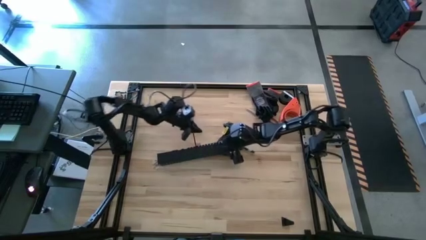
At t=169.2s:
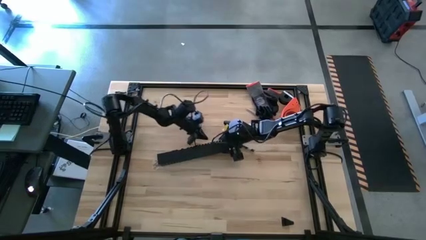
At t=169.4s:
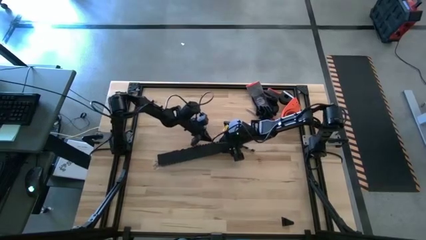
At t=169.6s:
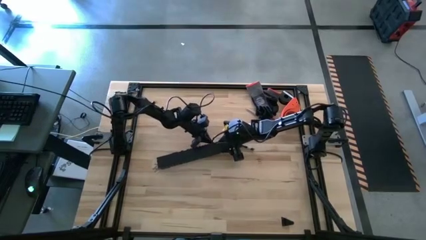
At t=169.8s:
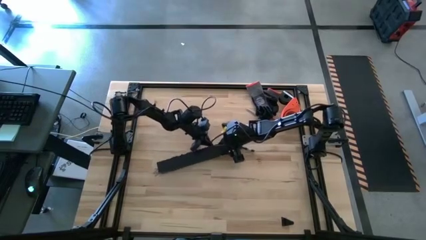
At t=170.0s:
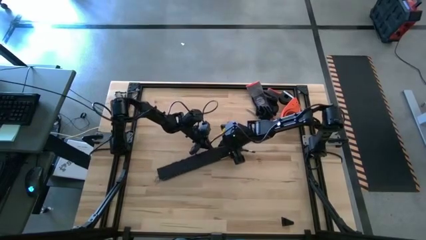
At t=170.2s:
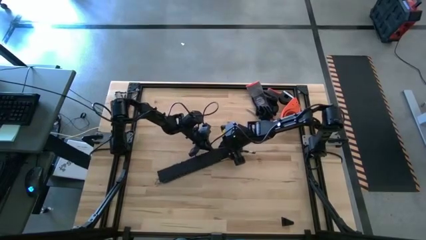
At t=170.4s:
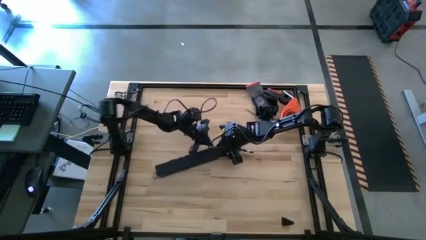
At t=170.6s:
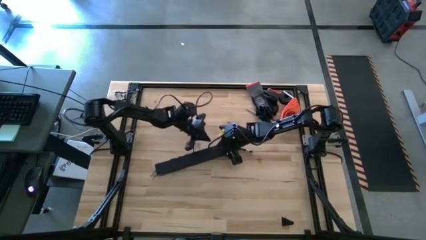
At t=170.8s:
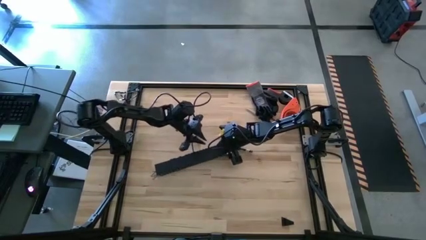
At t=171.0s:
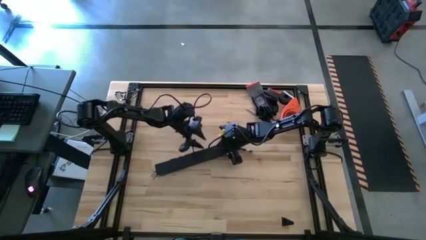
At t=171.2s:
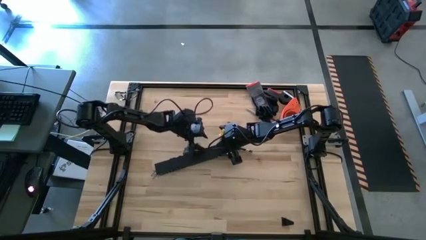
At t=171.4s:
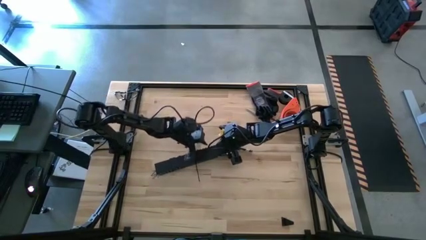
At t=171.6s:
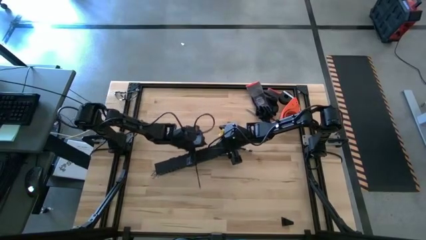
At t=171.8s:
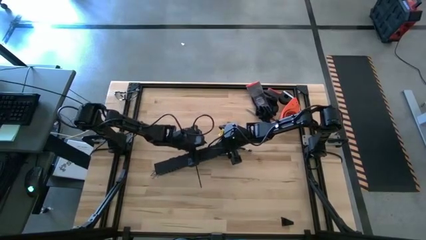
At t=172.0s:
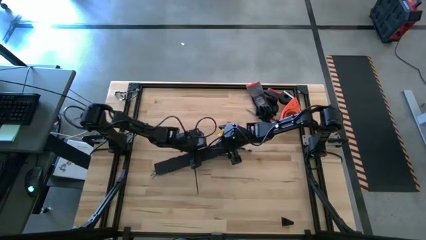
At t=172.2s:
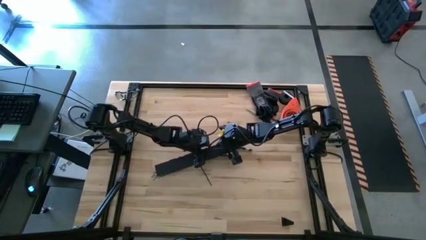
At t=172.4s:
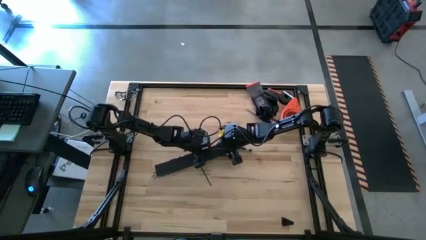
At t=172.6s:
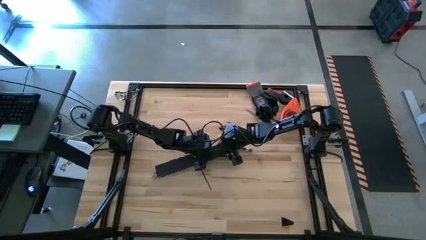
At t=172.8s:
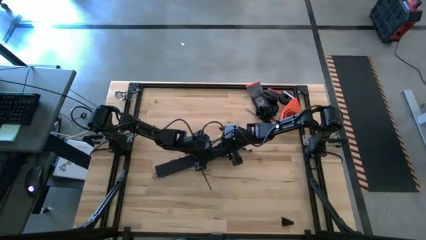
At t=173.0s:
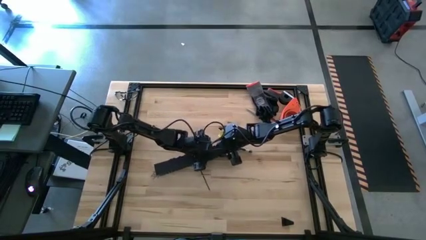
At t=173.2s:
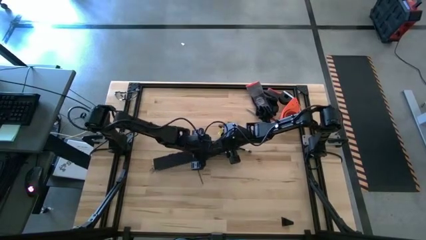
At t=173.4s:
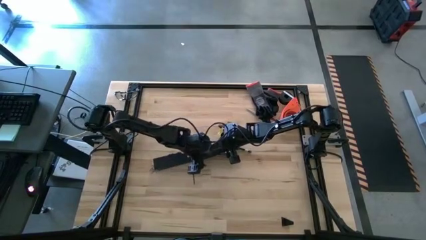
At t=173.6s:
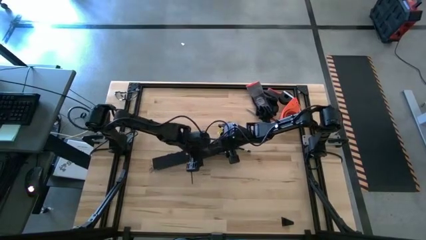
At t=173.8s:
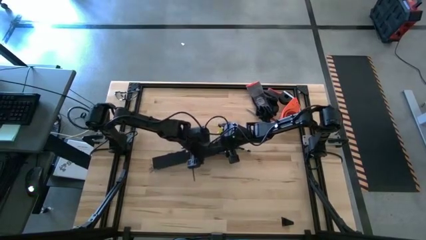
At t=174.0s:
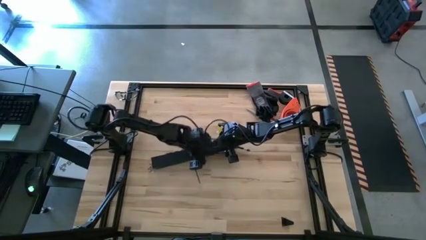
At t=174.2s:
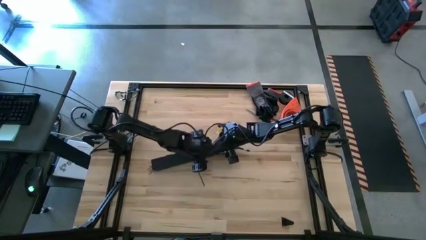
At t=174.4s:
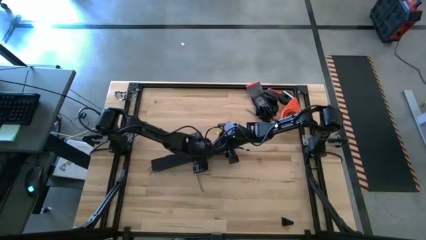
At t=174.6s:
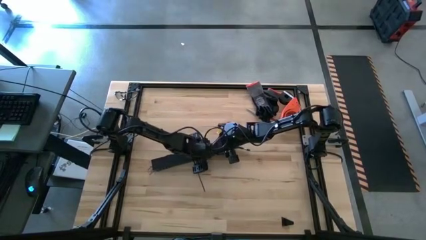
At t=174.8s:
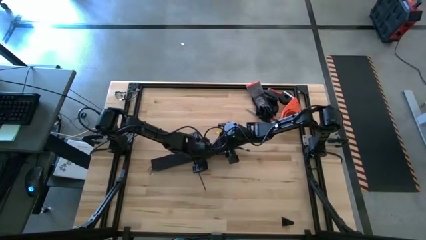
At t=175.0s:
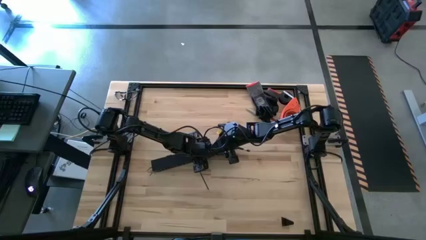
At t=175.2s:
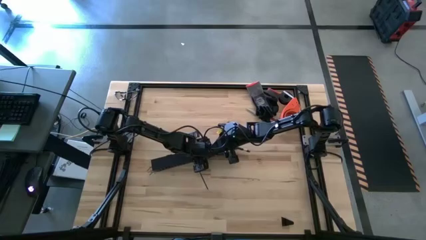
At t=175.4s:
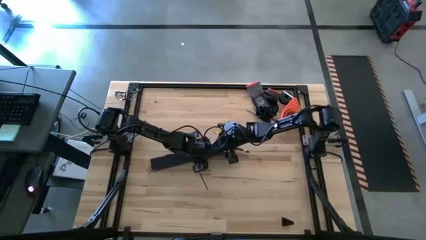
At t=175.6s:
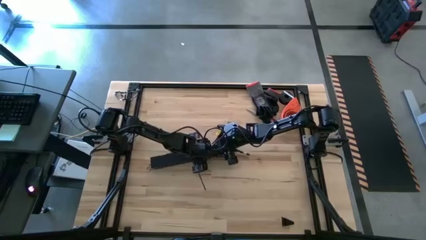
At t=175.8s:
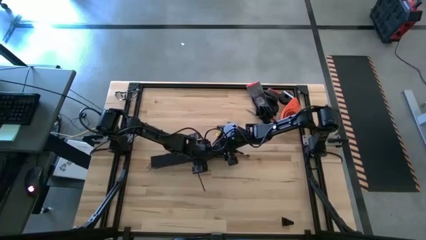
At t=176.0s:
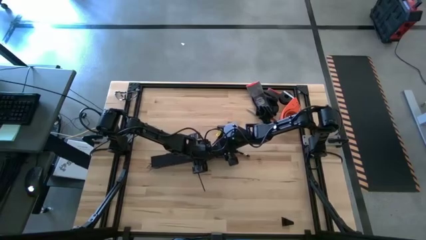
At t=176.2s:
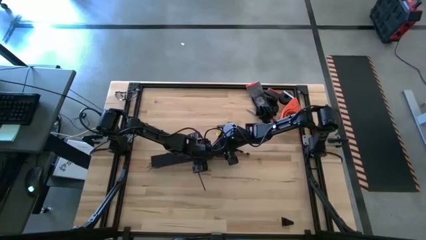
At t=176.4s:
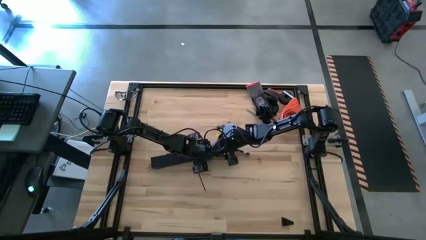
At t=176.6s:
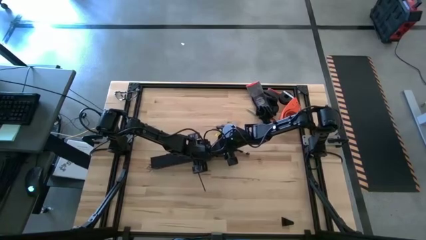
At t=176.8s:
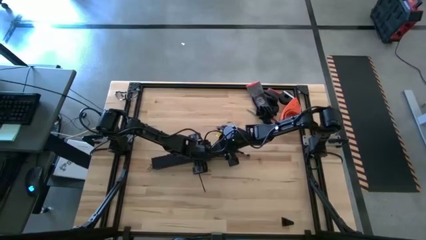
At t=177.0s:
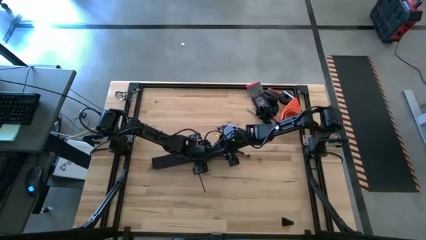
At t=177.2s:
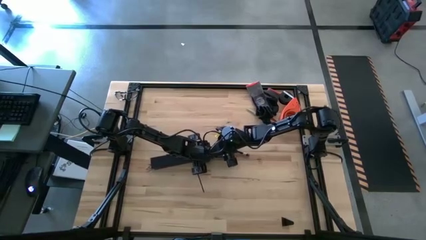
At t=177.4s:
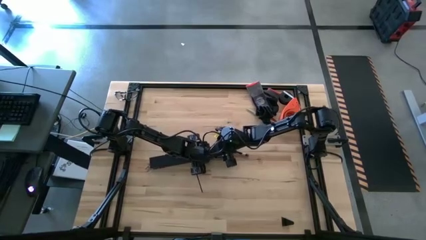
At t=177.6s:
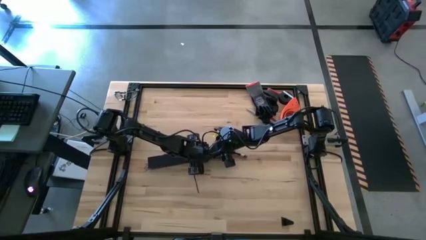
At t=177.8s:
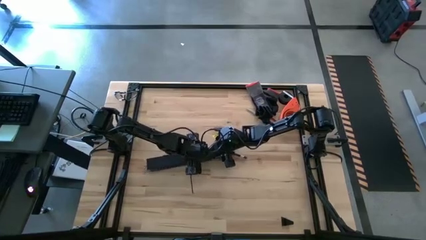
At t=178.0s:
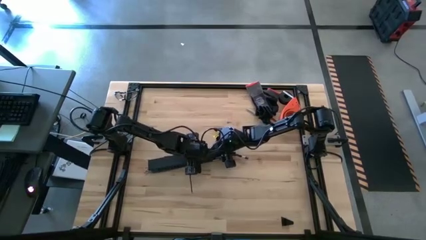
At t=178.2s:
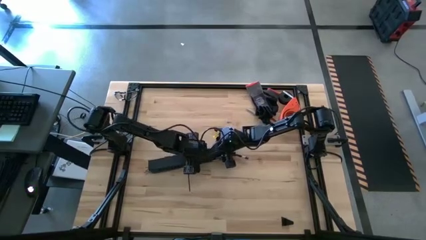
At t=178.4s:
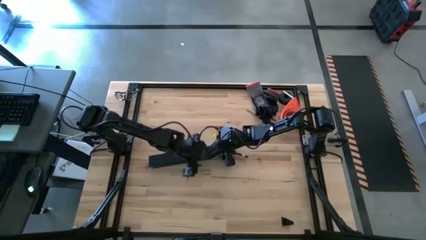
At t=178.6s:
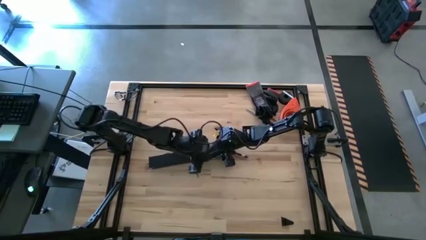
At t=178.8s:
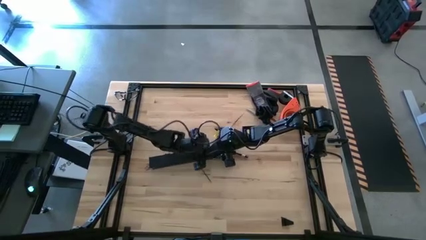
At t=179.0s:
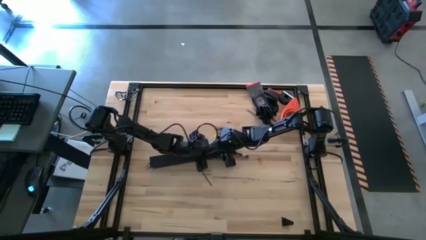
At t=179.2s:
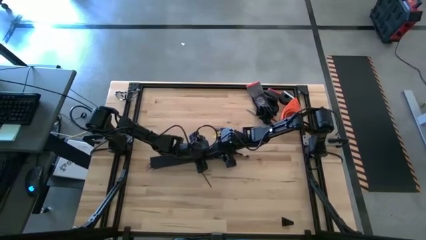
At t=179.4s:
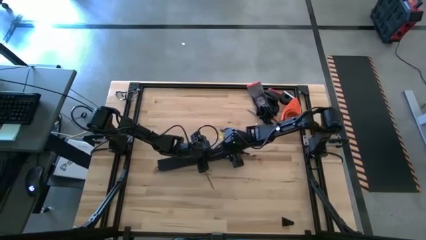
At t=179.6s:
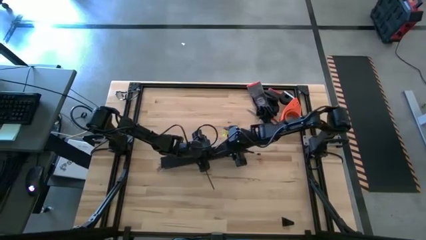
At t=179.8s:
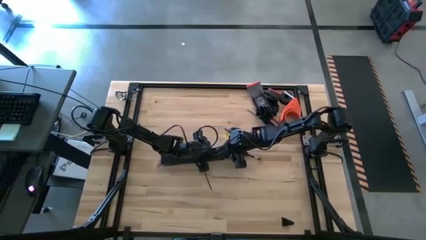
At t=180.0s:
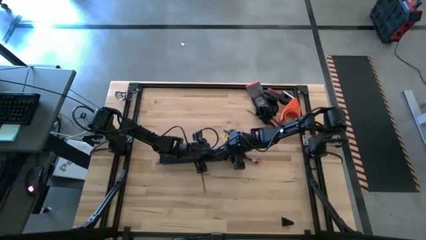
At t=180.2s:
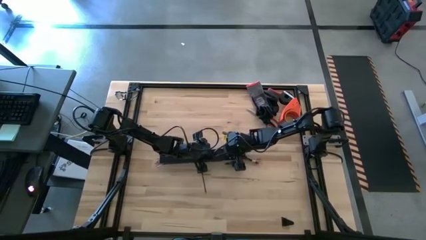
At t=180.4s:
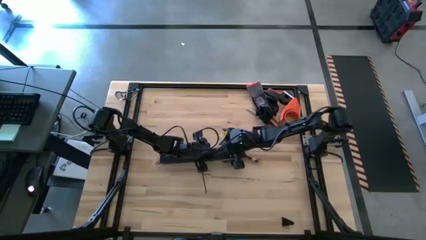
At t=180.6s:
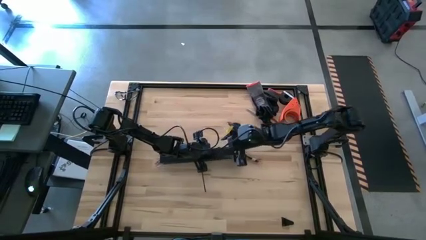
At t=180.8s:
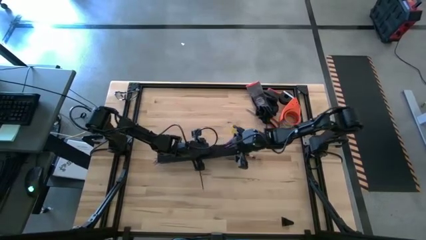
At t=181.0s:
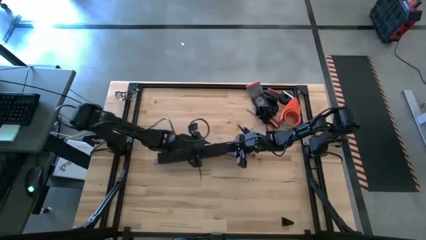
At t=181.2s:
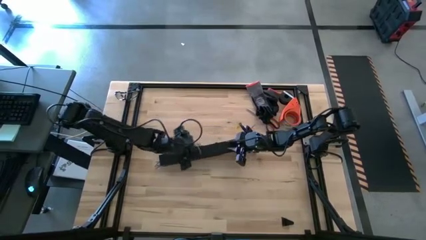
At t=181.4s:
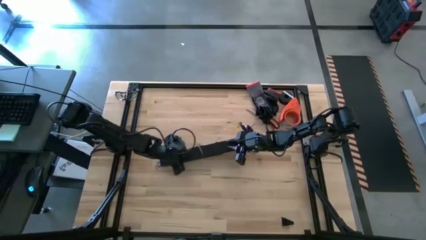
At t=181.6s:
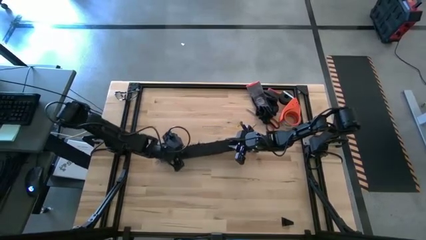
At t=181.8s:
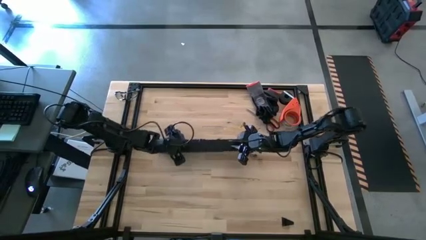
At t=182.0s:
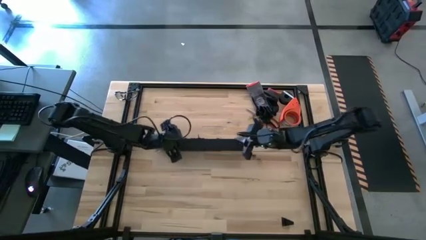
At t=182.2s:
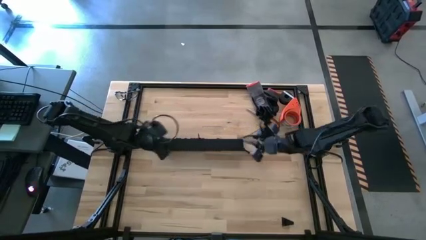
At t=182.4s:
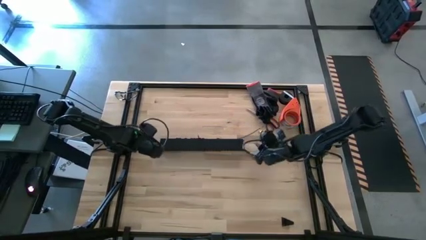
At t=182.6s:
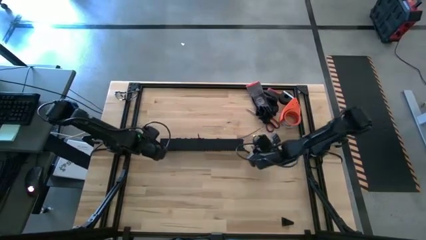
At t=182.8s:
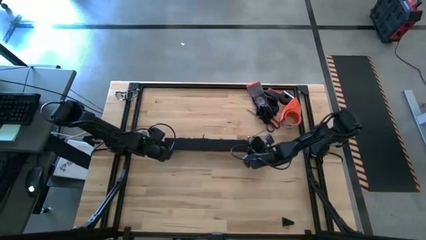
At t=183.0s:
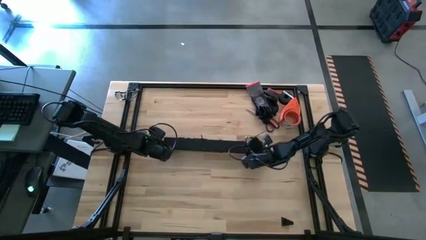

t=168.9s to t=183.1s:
Task: Ziptie cables
Close the black cable duct

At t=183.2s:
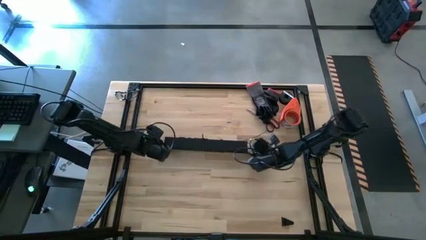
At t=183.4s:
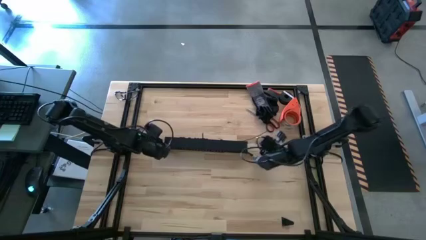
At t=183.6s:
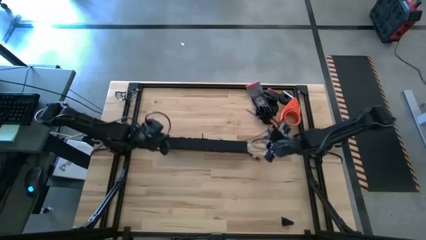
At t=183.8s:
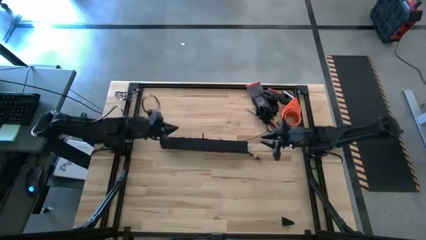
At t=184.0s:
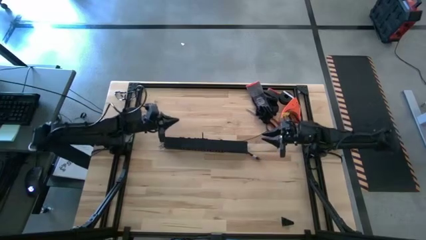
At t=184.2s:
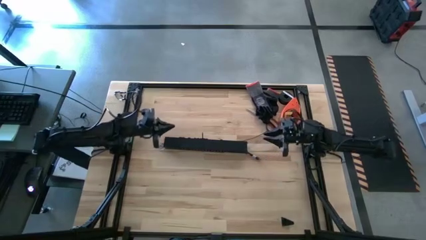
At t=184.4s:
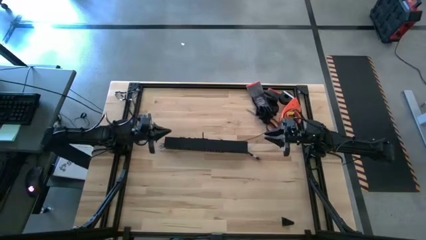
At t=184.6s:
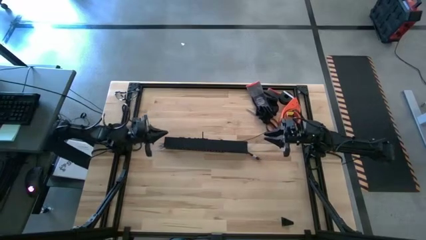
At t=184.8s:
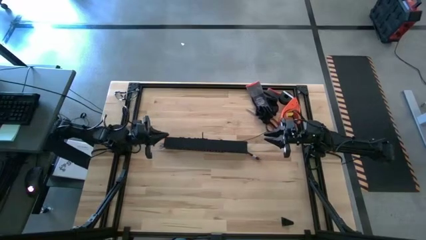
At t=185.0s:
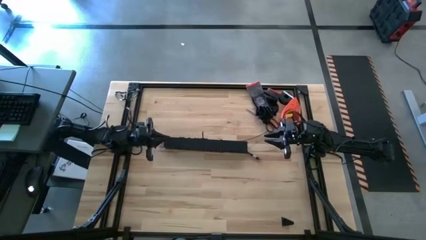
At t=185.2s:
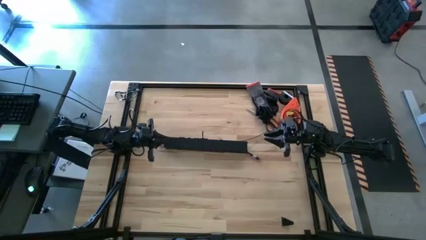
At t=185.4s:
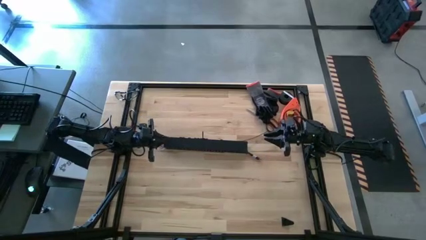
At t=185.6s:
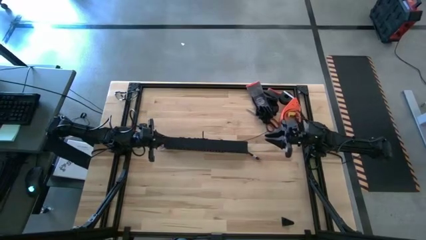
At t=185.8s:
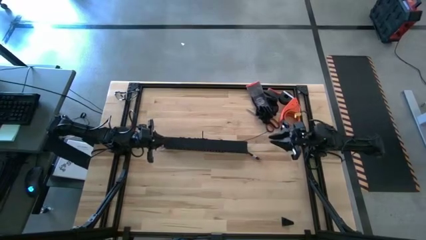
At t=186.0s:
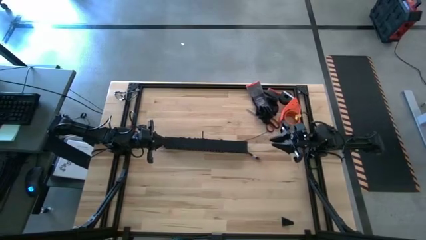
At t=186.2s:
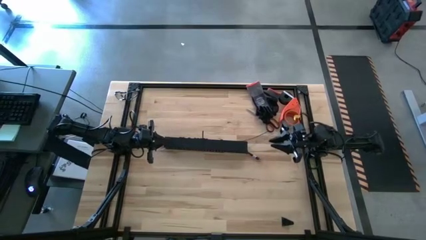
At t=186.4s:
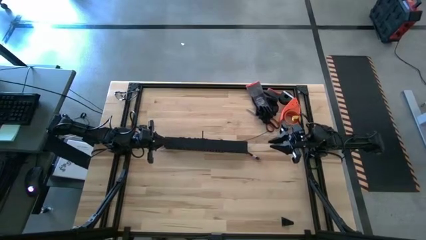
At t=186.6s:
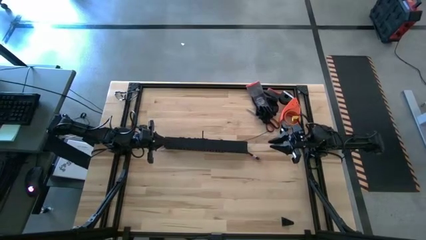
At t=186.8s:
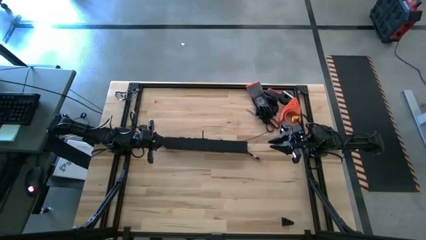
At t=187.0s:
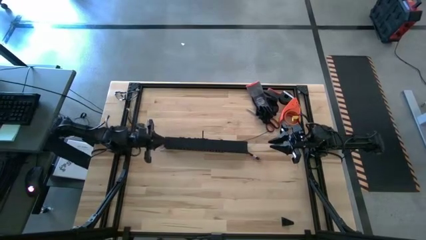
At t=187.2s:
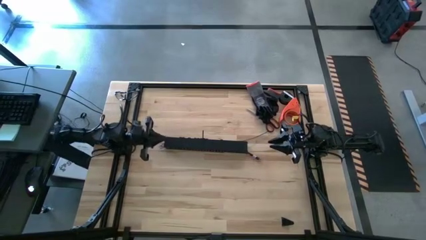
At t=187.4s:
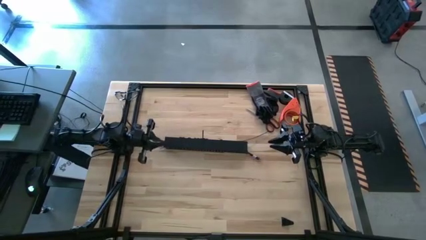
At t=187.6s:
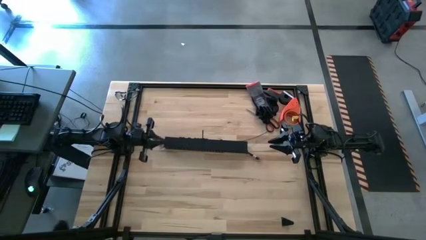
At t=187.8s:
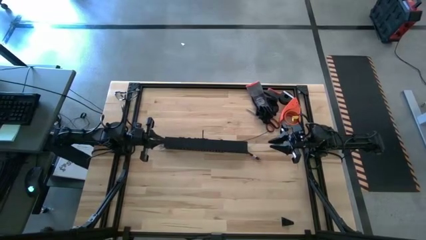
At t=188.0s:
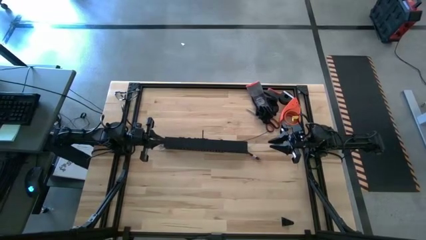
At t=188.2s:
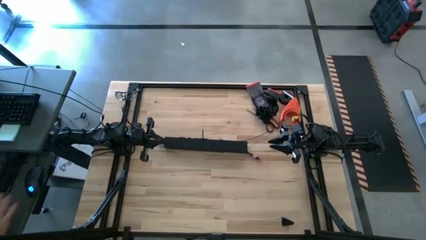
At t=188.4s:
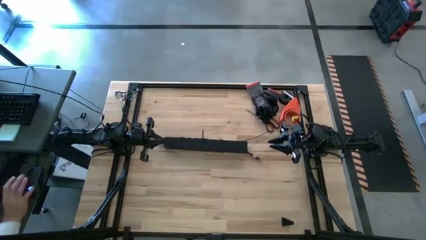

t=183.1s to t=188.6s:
Return to Home Position
